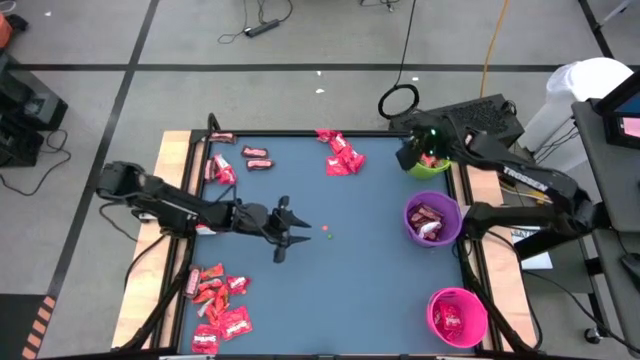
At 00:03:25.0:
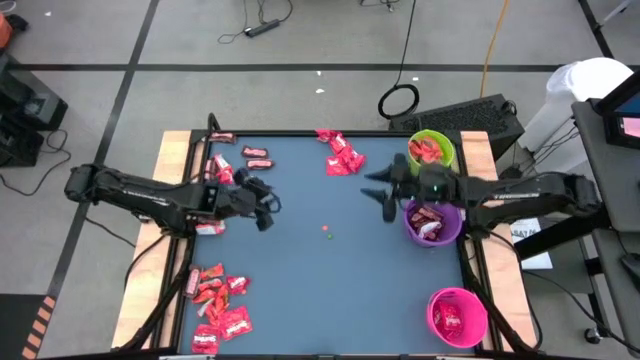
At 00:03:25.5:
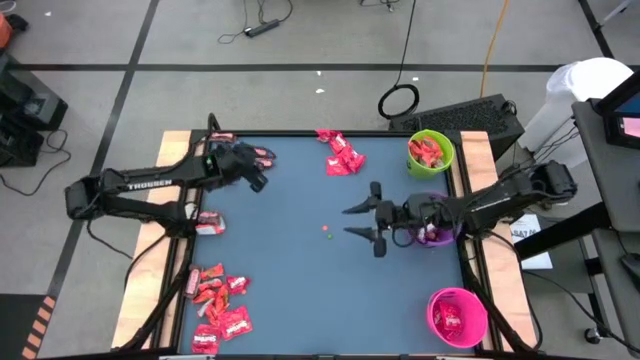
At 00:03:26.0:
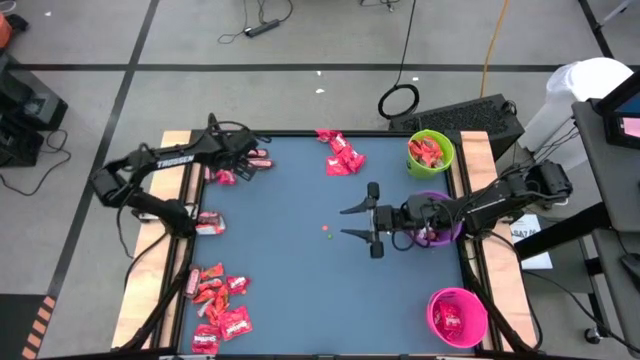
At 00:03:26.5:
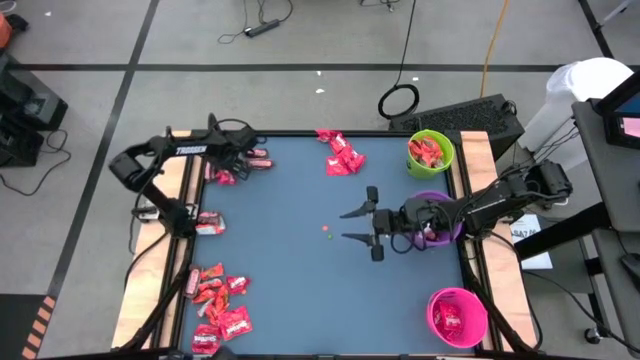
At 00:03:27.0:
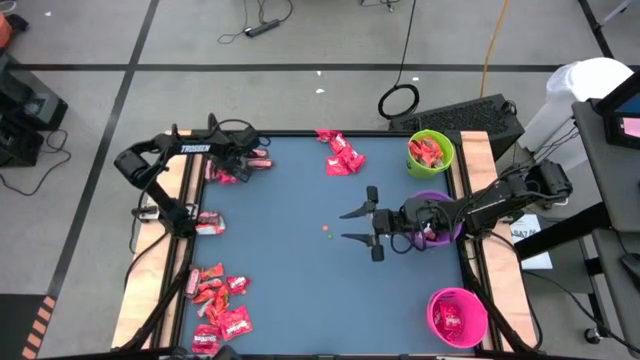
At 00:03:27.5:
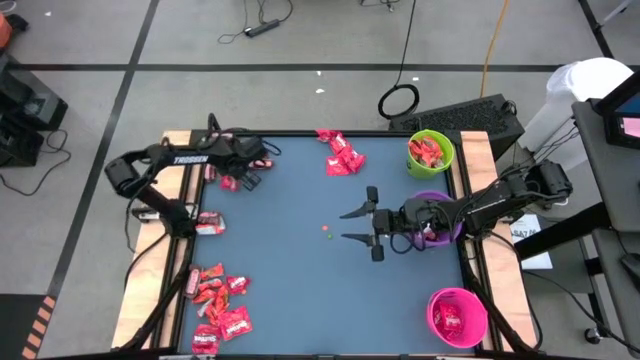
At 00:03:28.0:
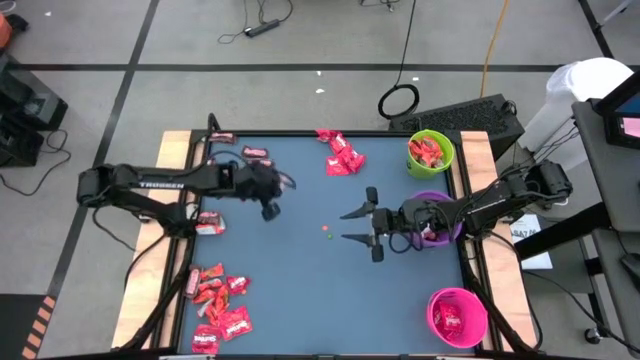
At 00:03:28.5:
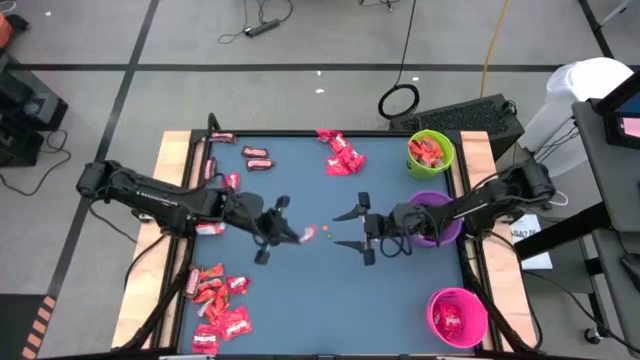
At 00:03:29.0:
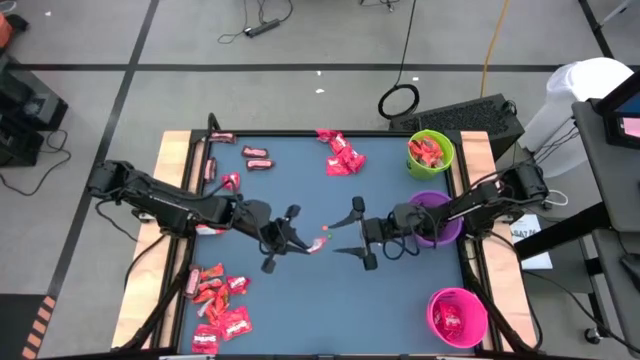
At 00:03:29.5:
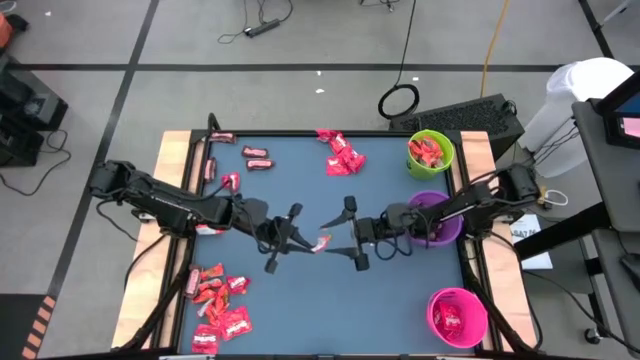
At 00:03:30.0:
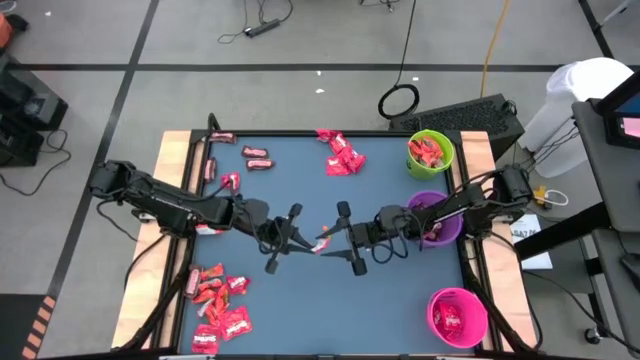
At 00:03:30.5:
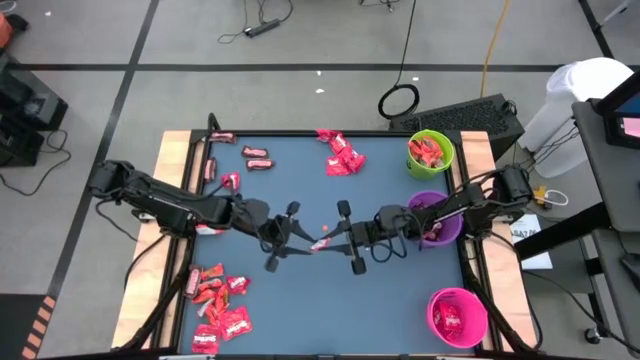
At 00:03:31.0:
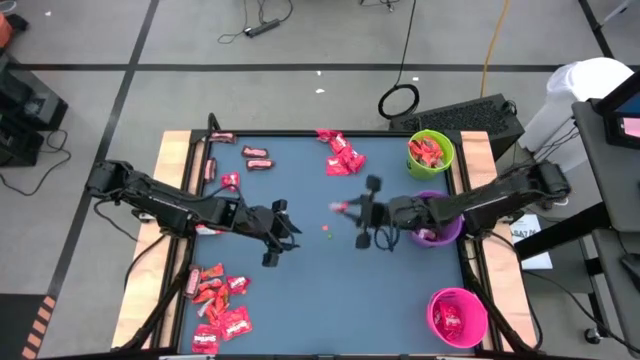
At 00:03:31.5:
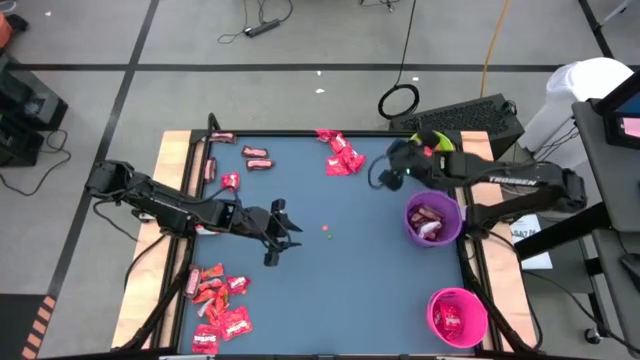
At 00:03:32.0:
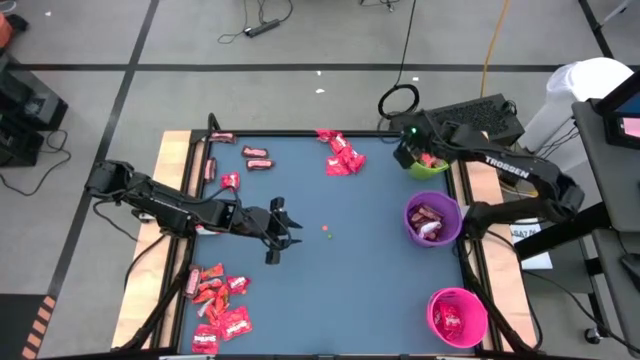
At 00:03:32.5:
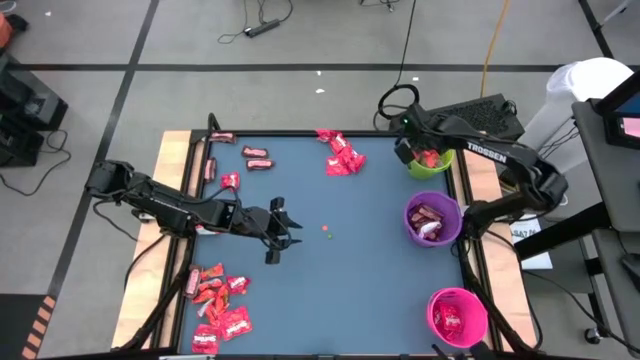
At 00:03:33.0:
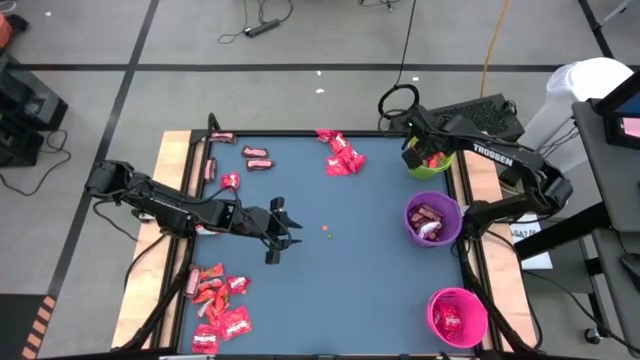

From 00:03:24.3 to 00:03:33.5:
Task: Organize candy in baskets
Put the orange chocolate bar into the green bucket

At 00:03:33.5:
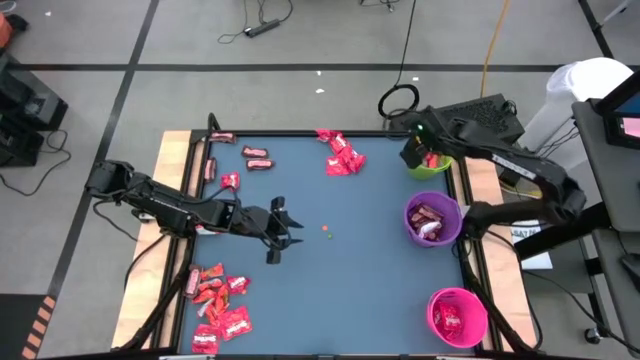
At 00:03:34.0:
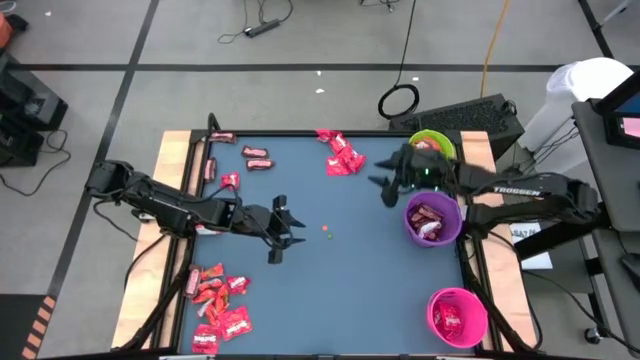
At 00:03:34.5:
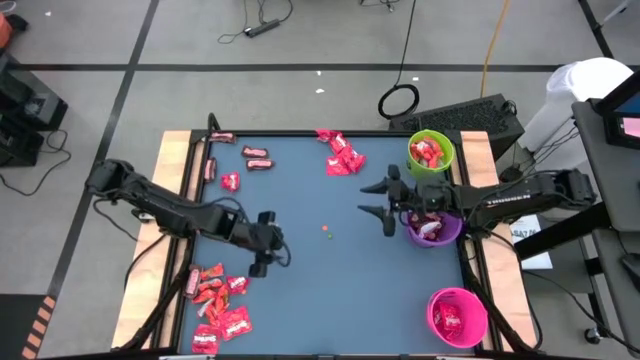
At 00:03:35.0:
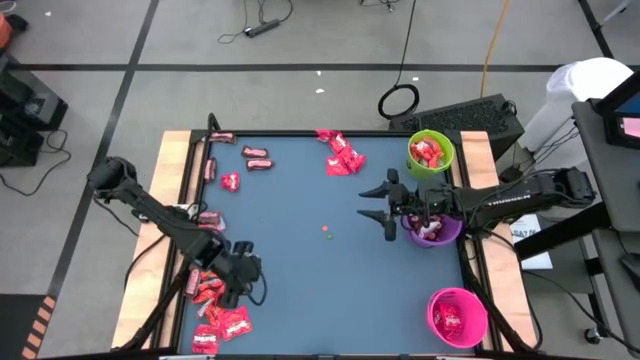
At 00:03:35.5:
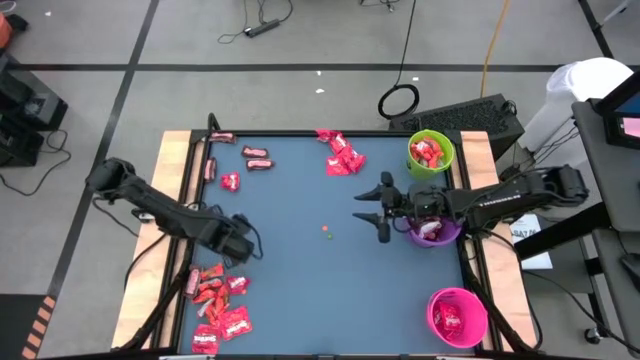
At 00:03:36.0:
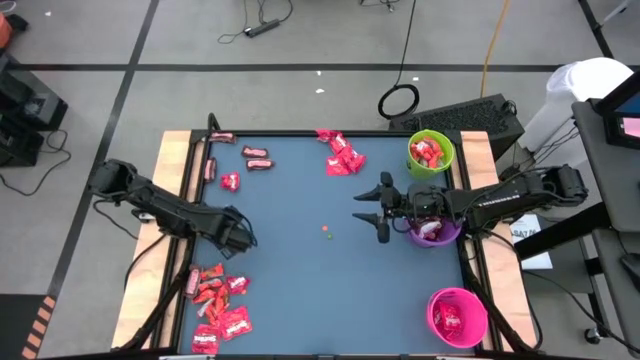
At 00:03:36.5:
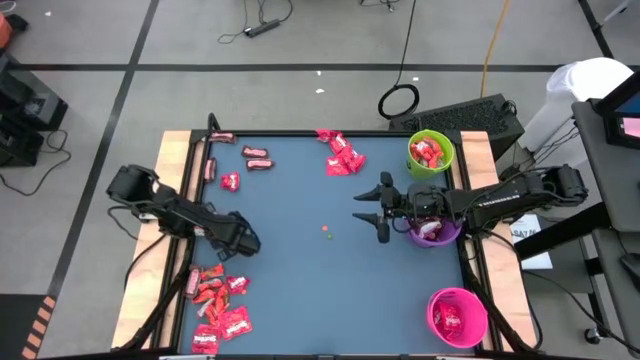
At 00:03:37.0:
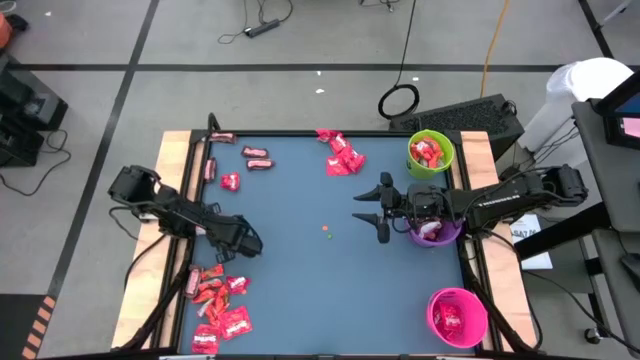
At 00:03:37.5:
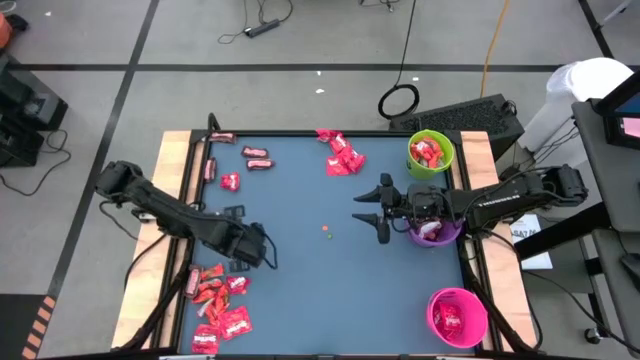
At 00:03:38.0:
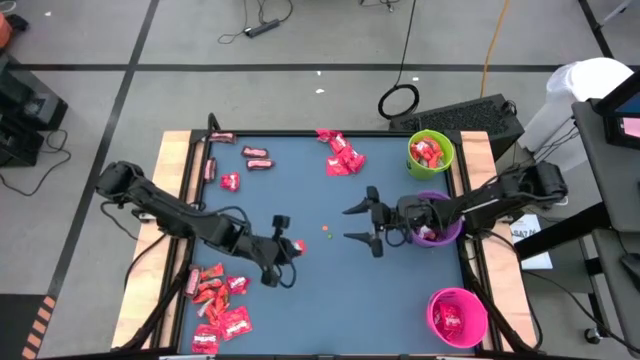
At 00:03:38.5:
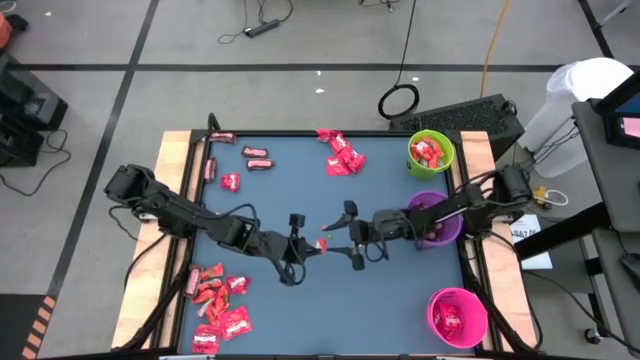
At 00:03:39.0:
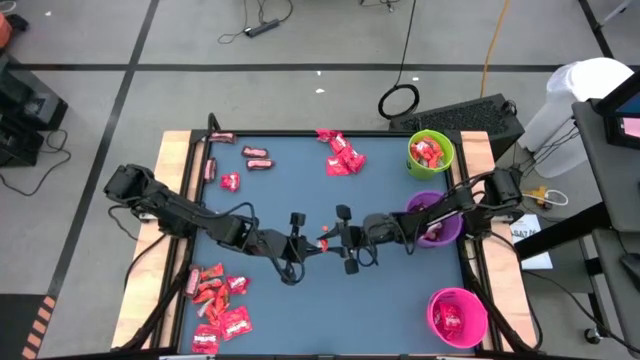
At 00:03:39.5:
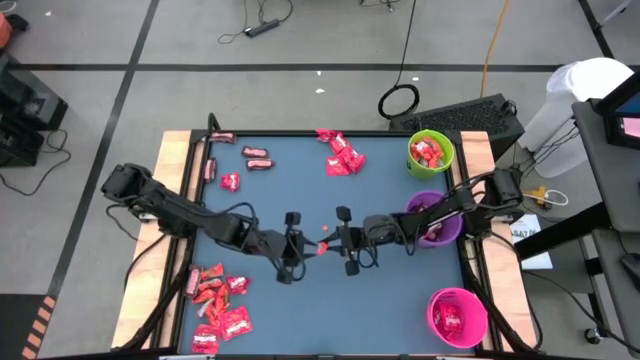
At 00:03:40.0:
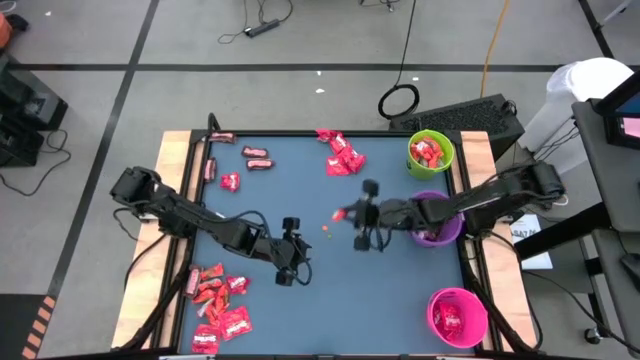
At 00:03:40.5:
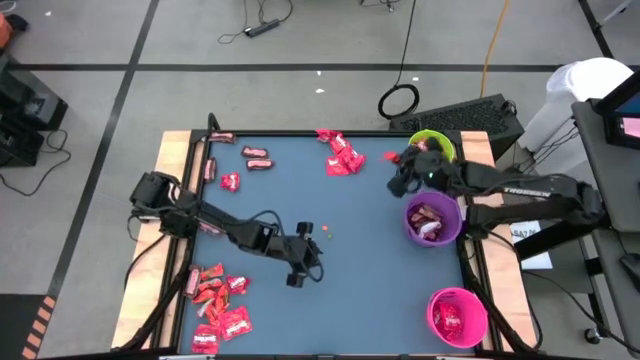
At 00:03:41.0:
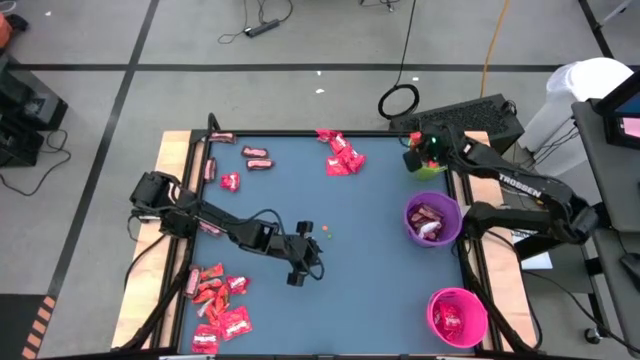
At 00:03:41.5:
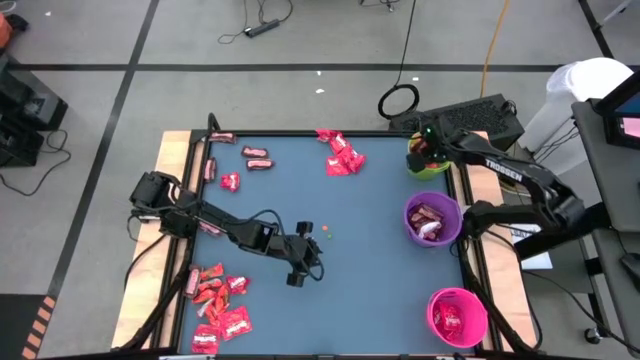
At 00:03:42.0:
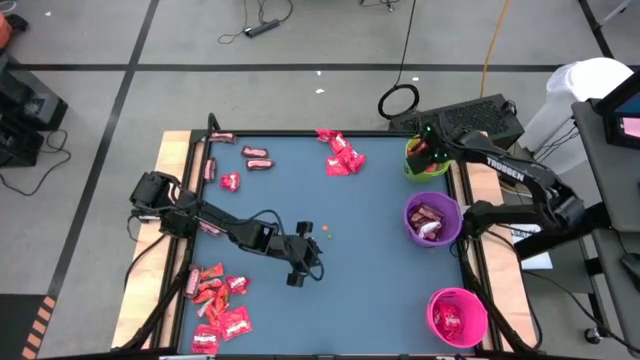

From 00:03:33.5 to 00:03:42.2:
Put the orange chocolate bar into the green bucket

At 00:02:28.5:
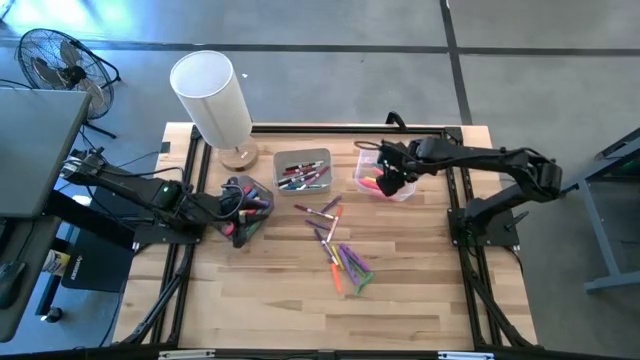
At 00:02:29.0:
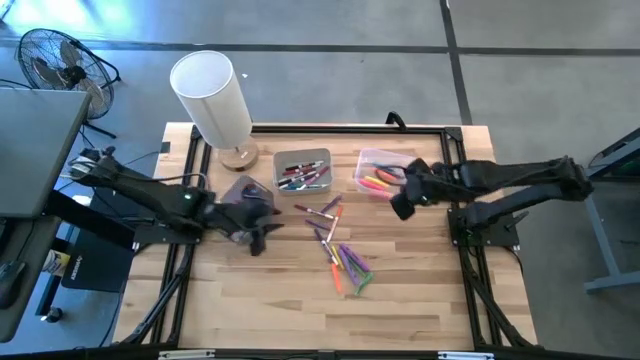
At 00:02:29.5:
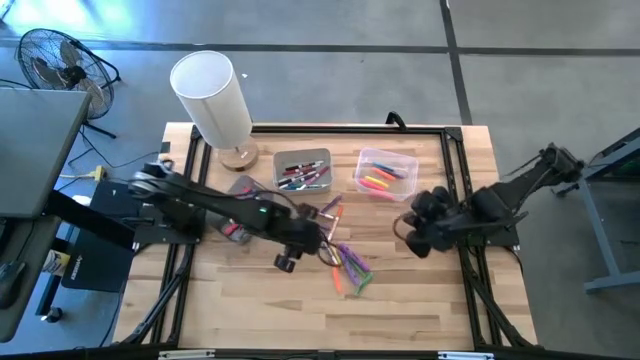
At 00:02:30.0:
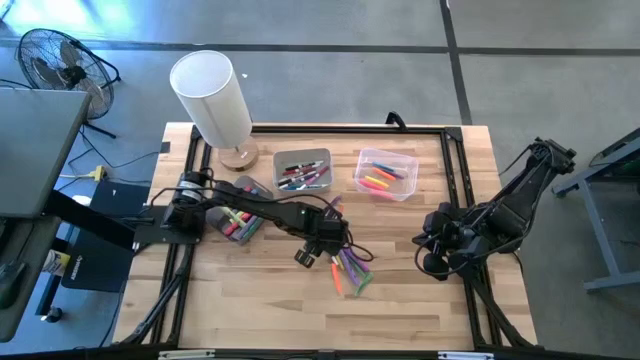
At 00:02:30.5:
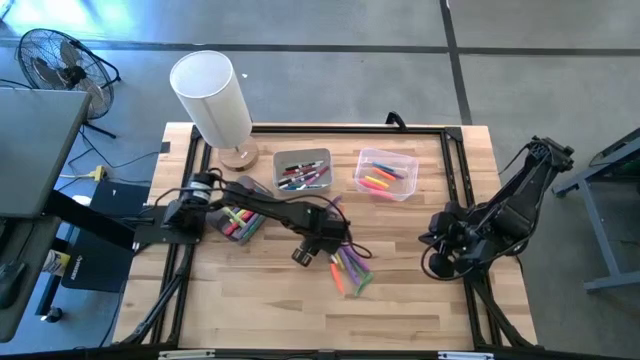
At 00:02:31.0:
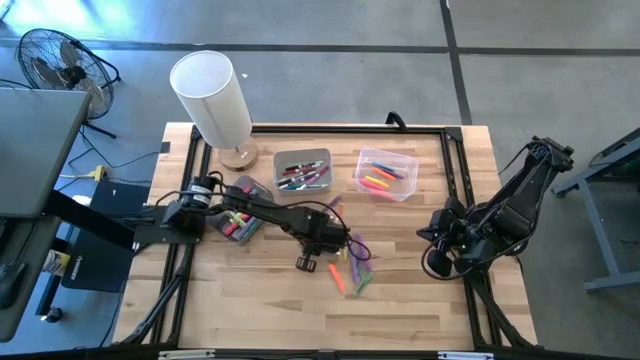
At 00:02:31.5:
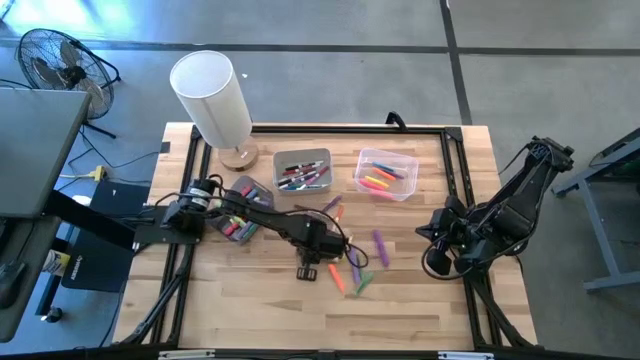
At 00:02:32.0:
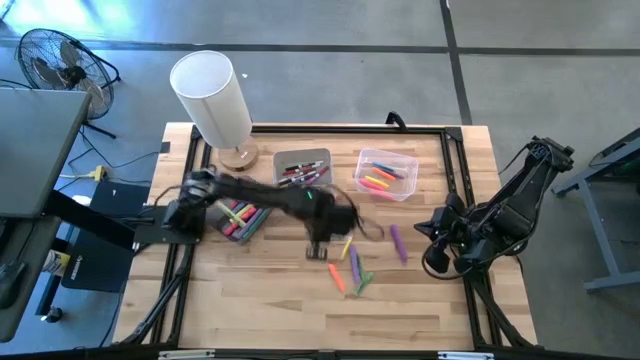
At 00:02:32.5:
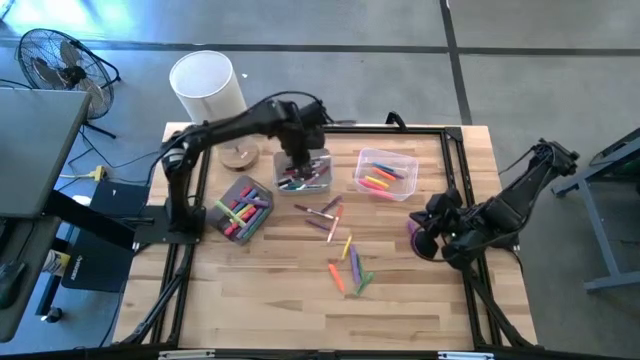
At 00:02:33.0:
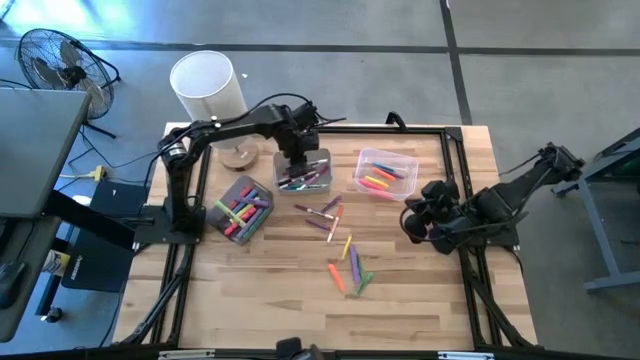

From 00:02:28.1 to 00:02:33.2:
Task: Pick & Place Markers
Put the blue marker pen into the white bin
